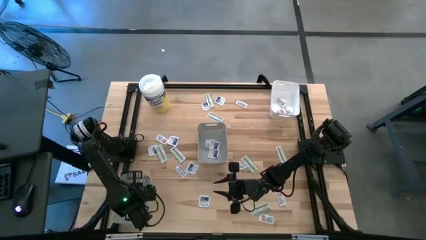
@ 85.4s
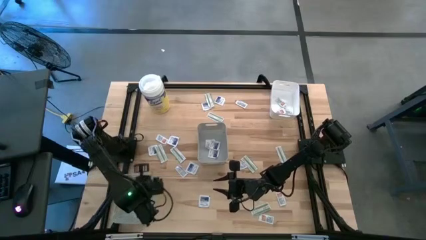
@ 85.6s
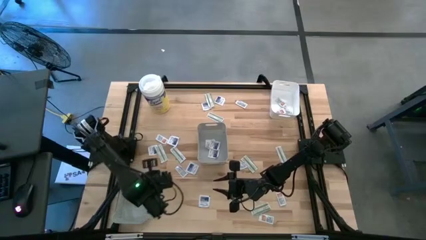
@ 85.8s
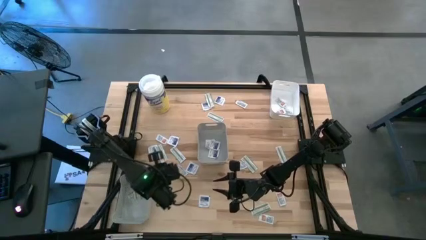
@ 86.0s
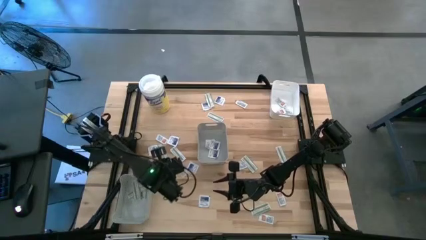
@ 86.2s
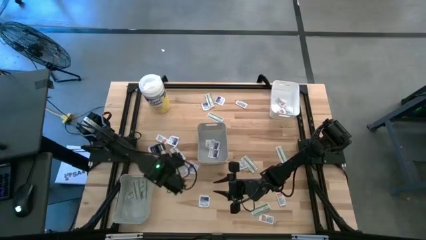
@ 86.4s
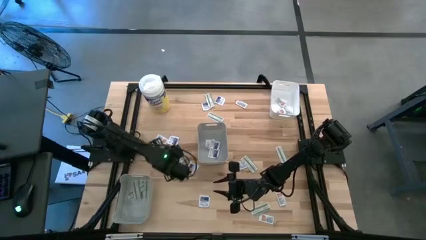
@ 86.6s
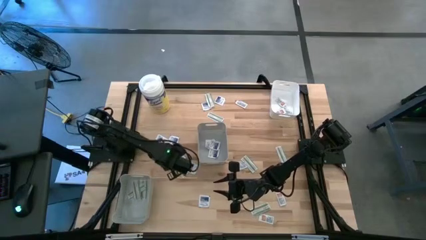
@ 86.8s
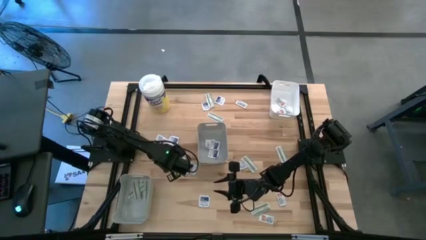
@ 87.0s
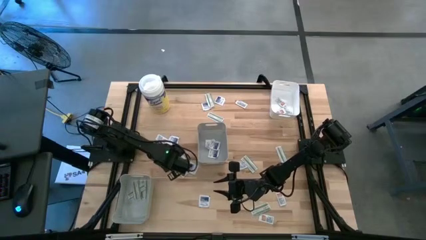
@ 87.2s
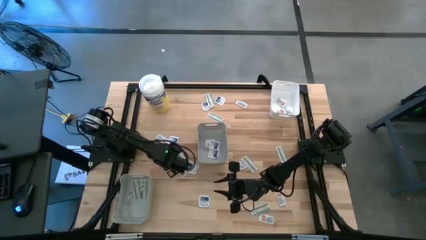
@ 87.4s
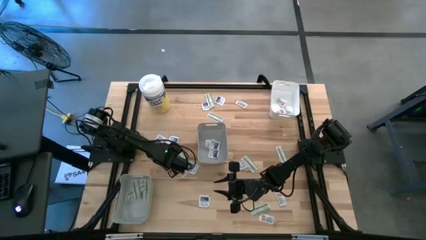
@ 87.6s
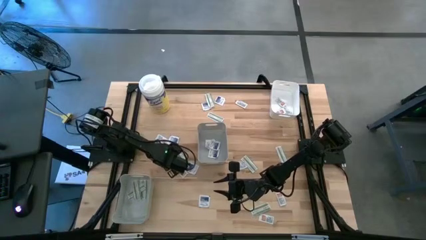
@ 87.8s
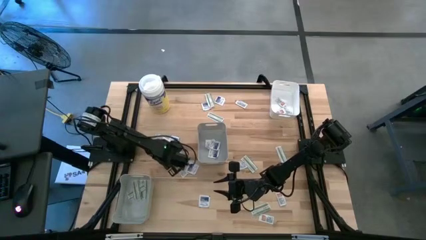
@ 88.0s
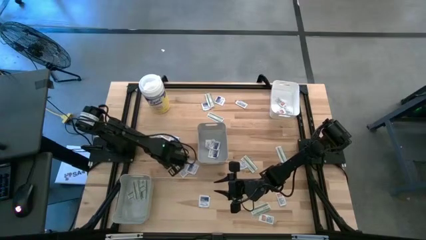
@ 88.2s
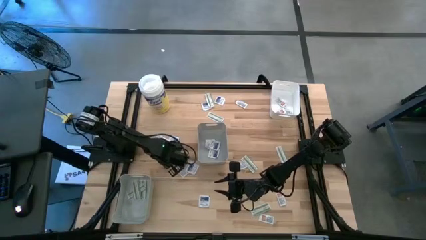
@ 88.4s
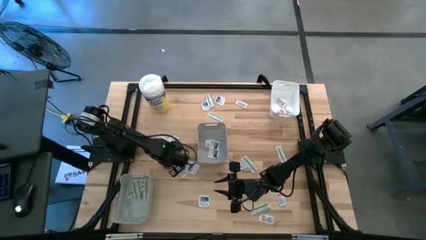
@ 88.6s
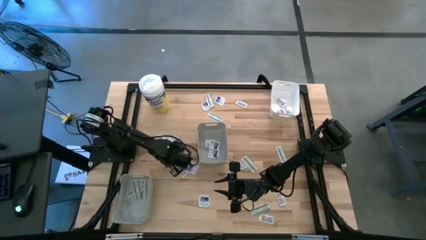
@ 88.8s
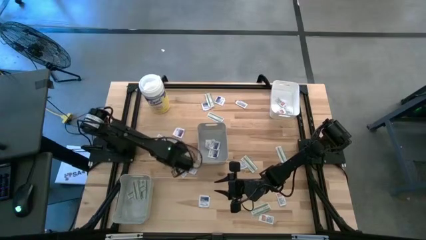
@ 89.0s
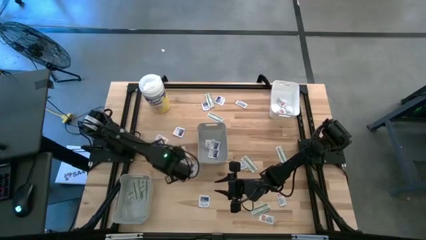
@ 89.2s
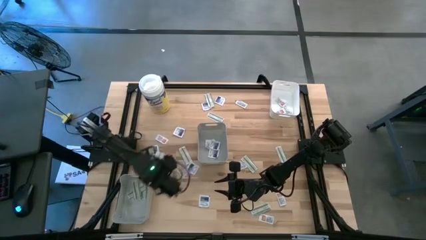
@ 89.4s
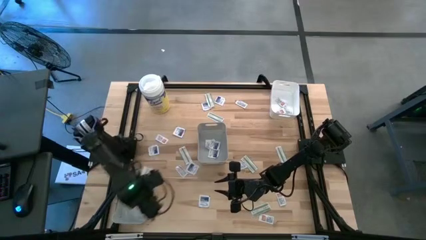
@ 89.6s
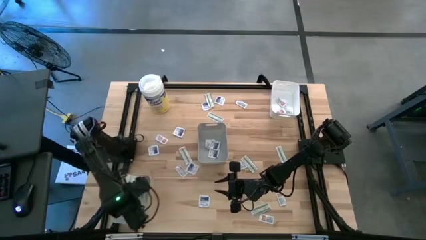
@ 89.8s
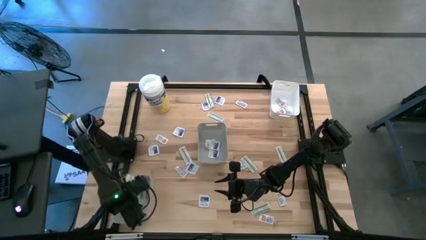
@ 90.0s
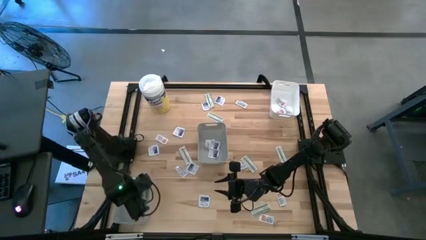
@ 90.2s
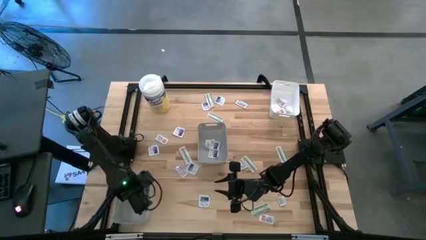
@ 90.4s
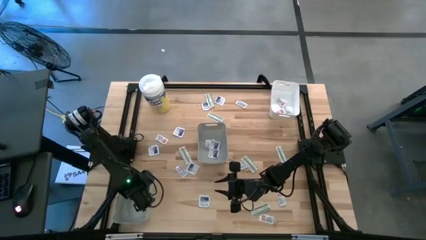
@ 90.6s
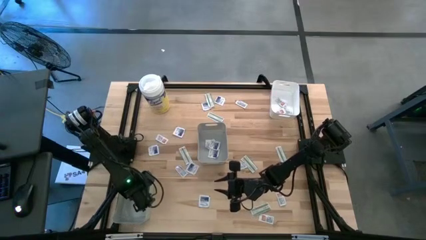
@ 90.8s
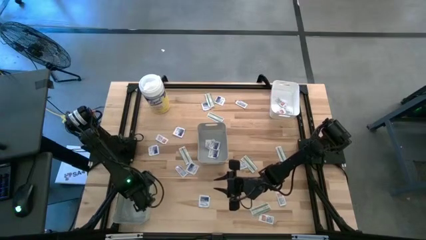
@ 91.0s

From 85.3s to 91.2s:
Task: Pick & Place First Aid Supplies
Put the green pad into the bottom gray bin

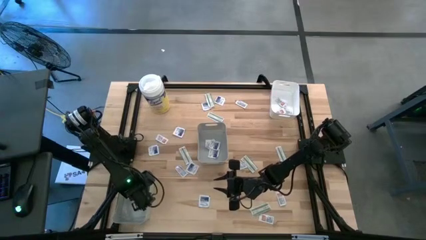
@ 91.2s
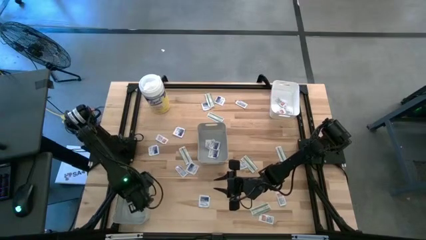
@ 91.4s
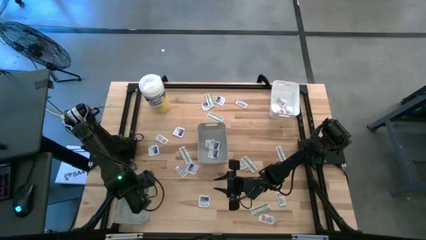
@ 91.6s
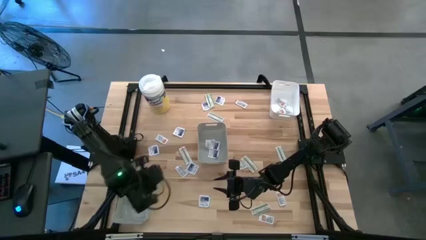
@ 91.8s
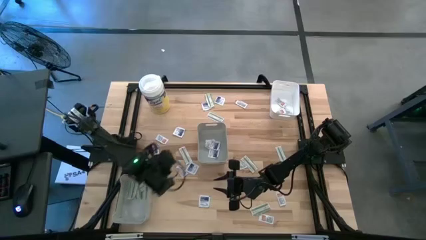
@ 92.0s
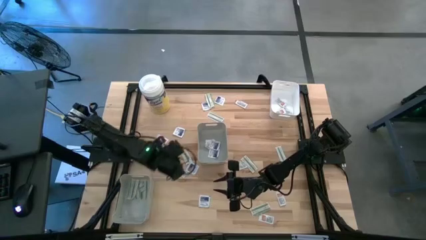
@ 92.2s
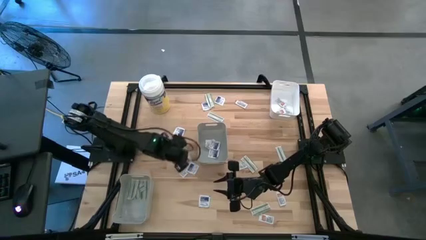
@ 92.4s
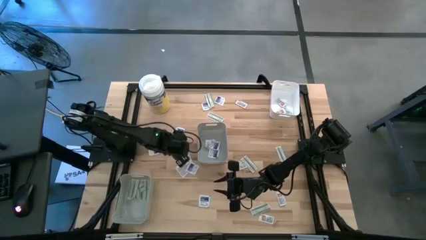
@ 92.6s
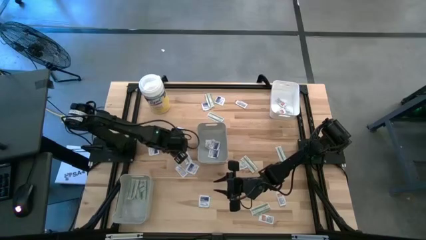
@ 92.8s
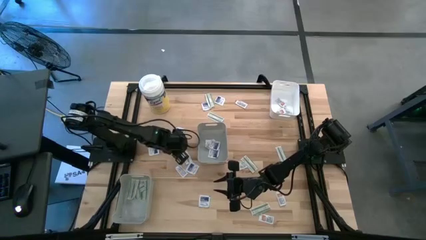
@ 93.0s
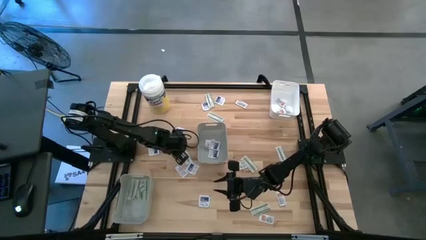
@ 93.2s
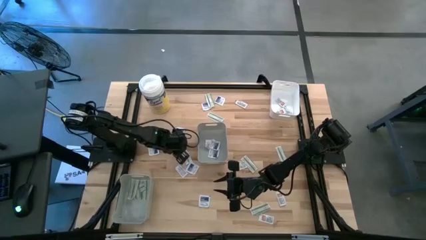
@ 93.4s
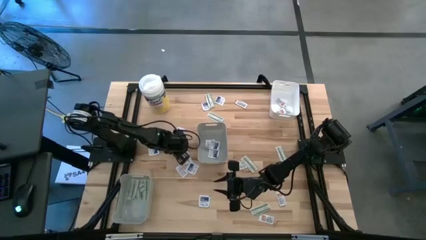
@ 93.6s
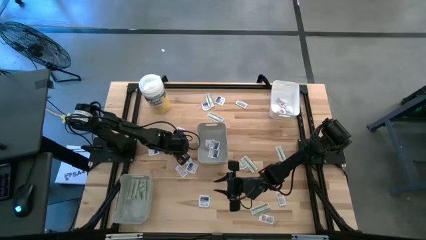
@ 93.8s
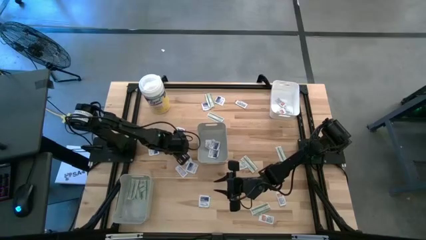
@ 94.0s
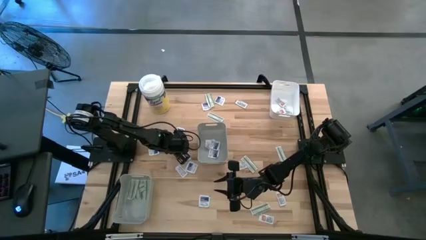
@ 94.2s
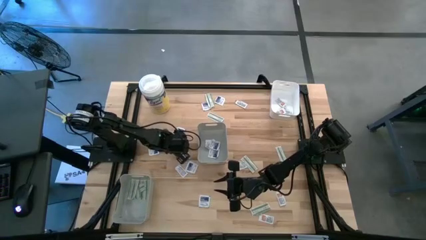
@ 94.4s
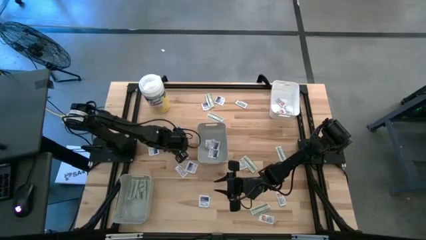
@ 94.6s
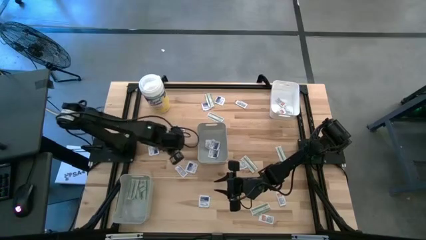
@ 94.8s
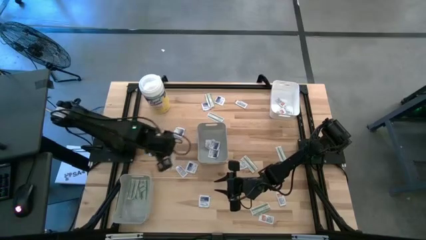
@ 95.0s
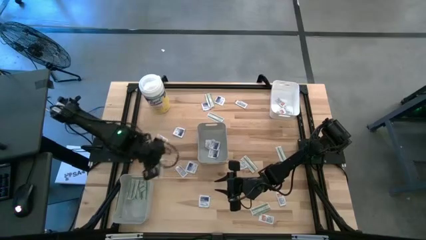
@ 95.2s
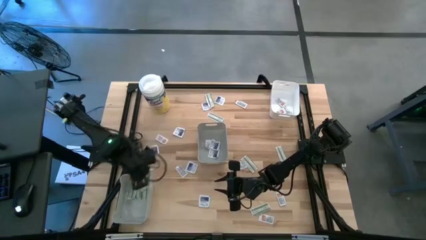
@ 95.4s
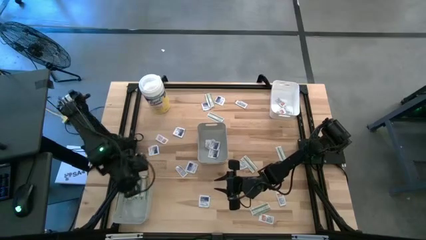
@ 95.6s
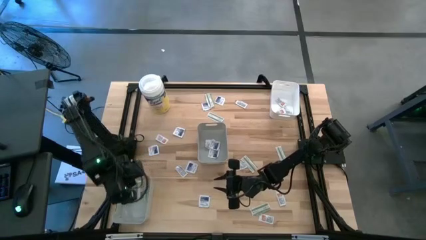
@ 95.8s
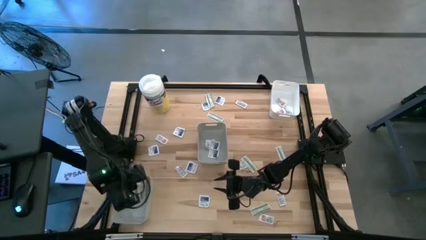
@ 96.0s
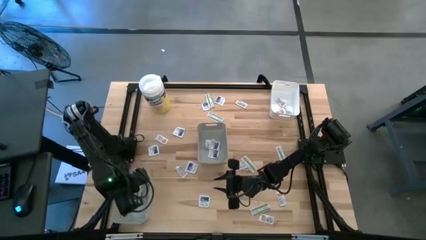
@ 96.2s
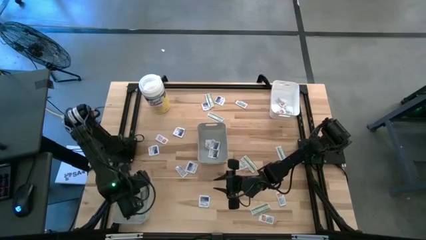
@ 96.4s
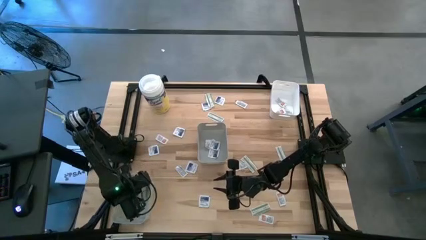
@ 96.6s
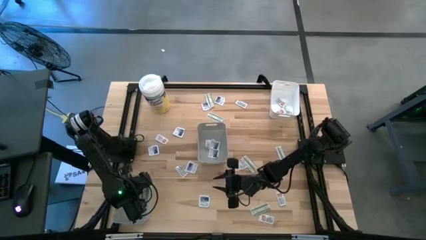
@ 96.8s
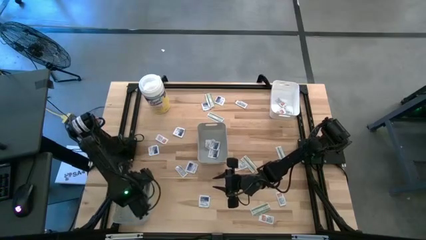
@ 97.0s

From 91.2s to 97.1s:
Put the green pad into the bottom gray bin

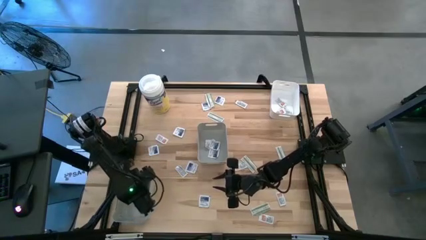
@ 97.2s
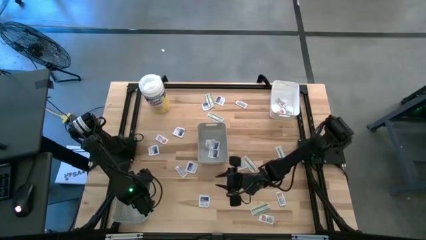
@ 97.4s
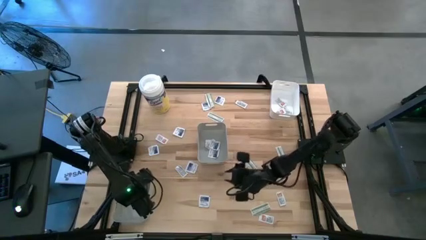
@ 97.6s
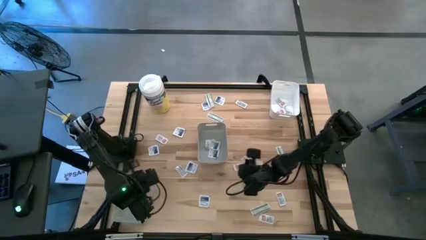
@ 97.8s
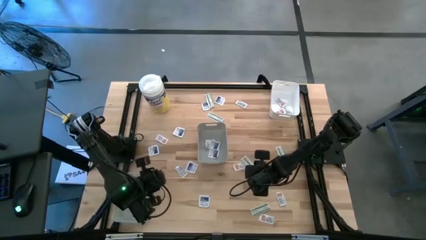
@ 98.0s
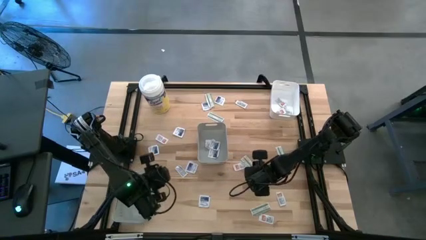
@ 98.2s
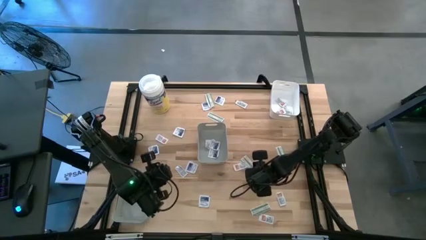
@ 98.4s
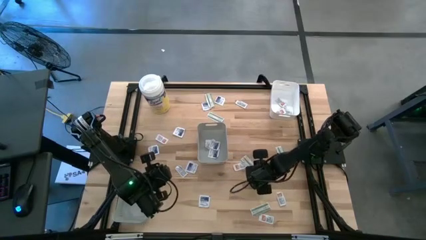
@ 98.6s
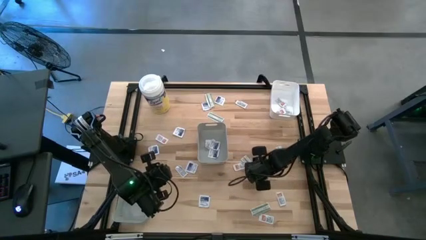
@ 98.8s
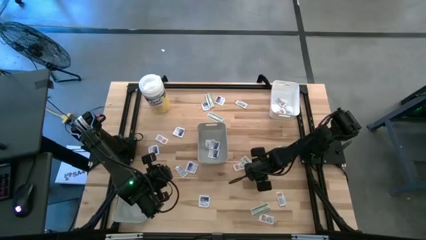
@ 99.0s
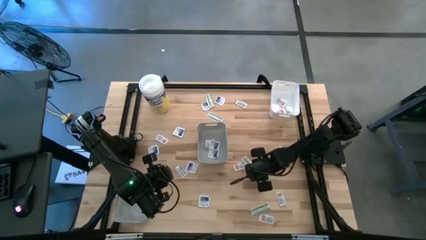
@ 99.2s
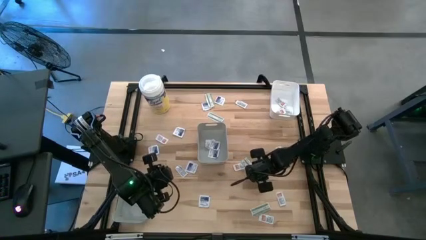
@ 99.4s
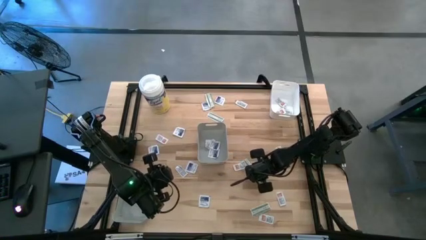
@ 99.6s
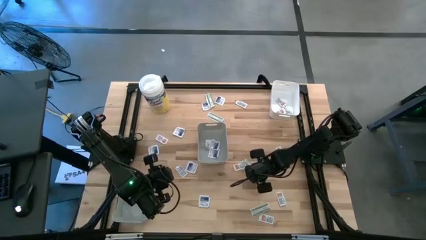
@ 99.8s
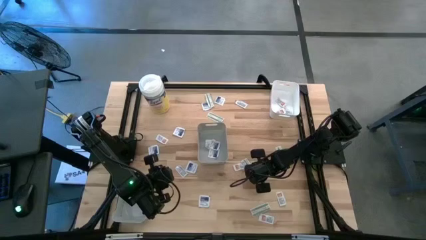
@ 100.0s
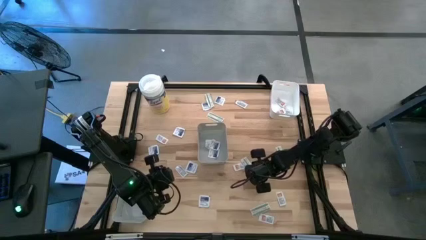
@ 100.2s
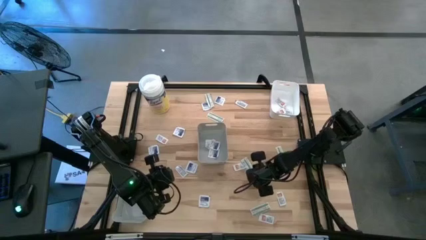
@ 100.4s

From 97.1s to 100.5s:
Put the green pad into the bottom gray bin
